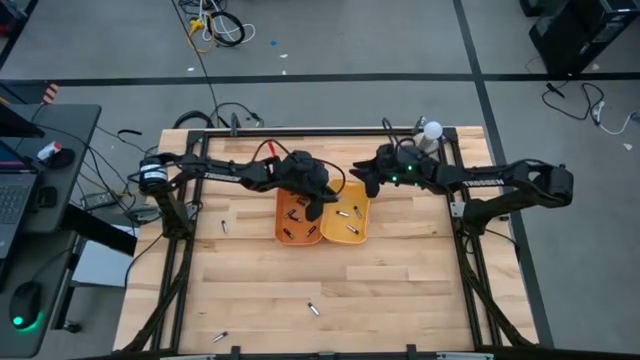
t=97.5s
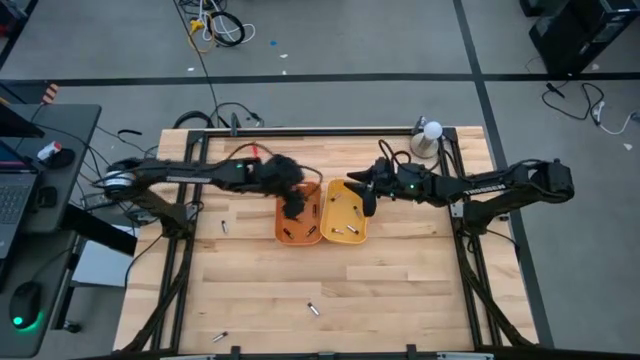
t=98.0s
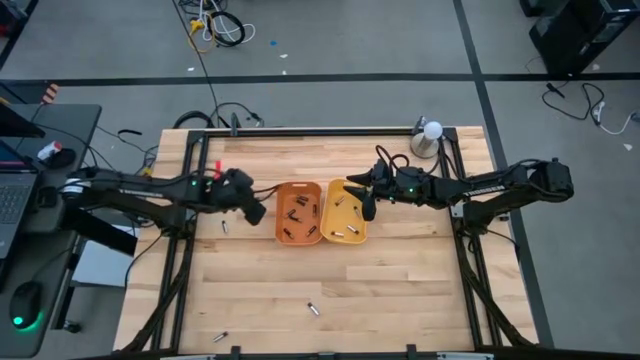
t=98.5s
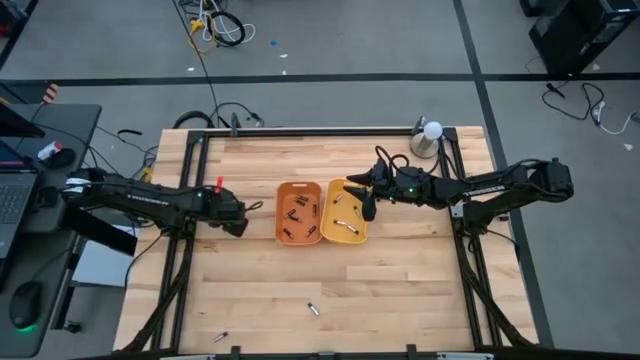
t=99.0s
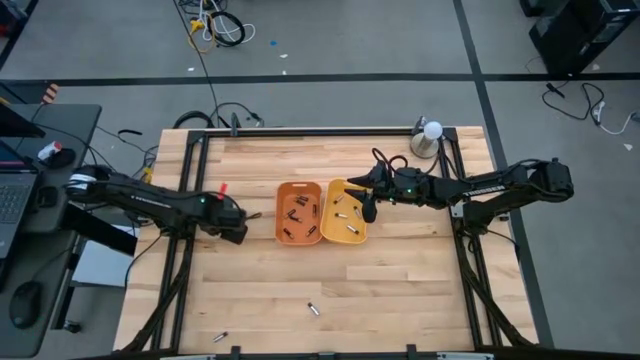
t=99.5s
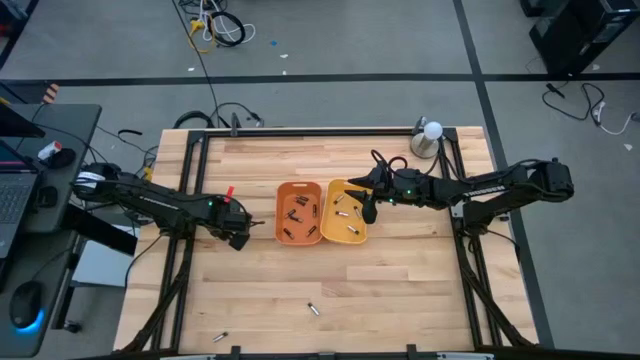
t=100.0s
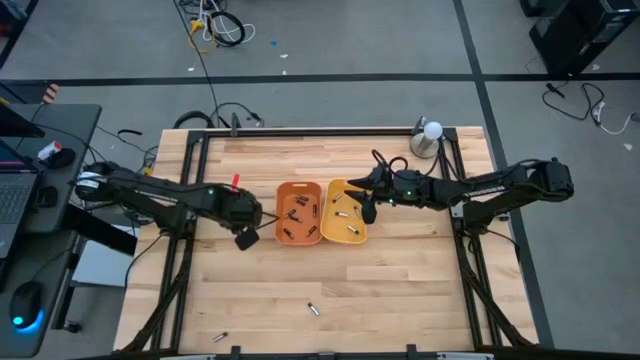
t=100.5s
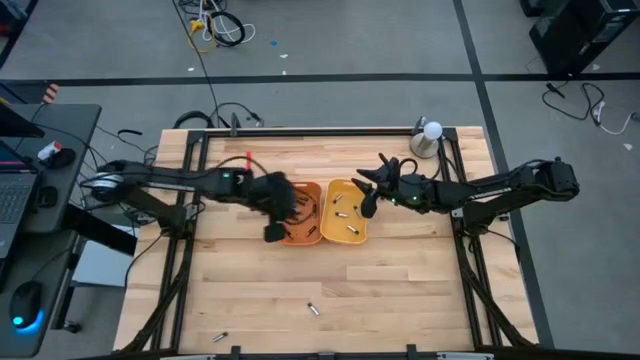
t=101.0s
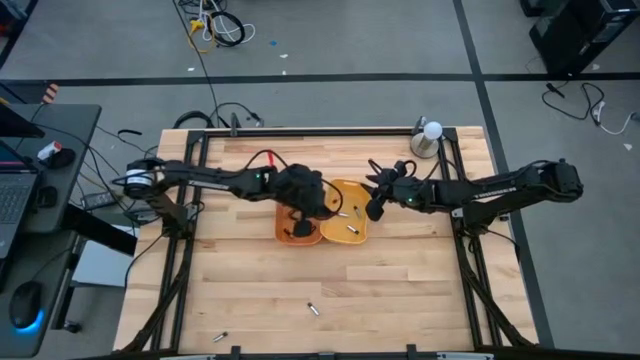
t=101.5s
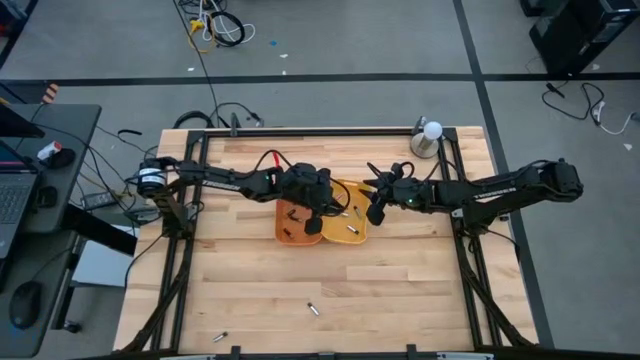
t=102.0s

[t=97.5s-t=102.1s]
Task: Sort batteries
Put the silver battery into the yellow bin

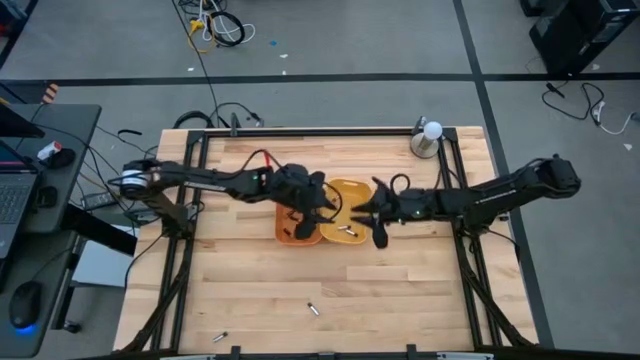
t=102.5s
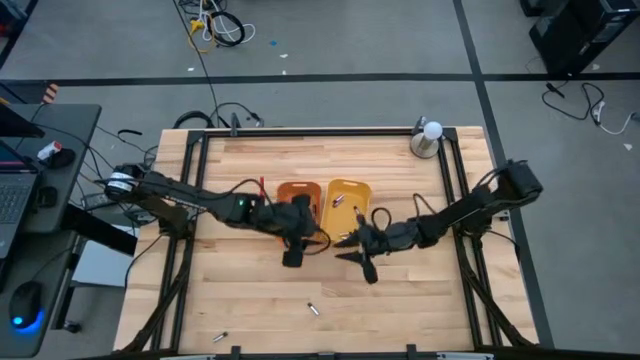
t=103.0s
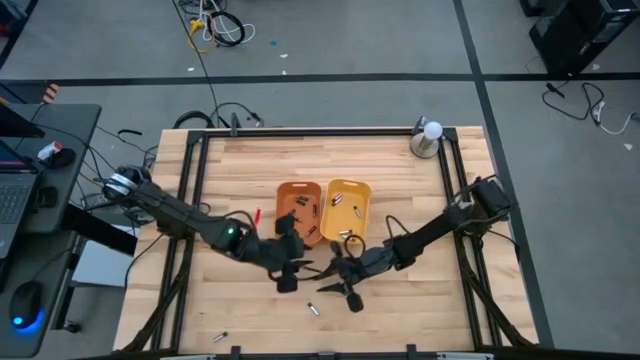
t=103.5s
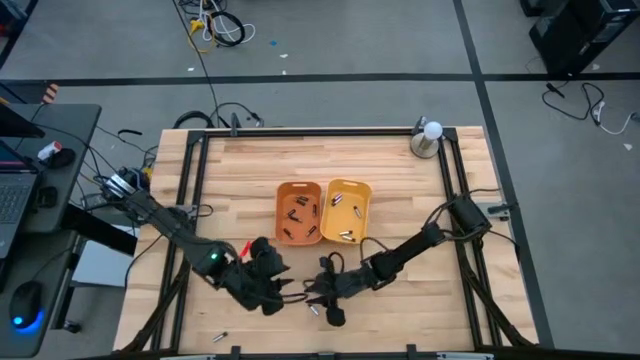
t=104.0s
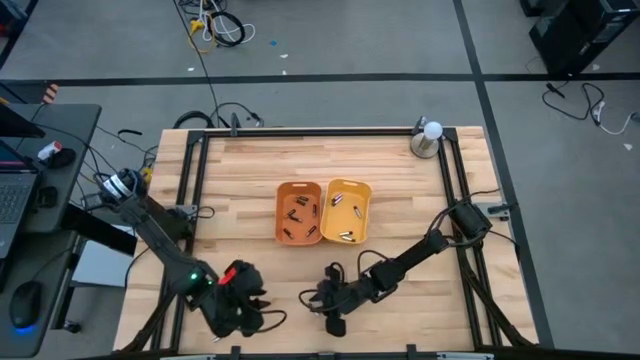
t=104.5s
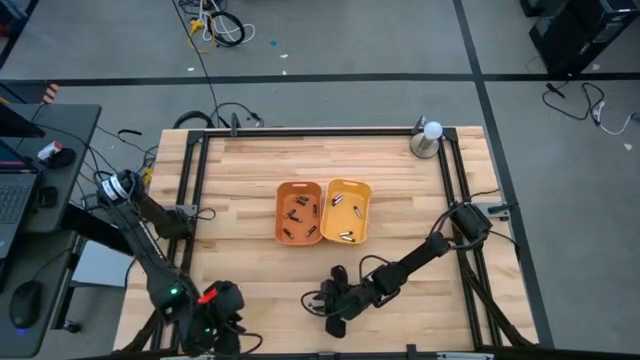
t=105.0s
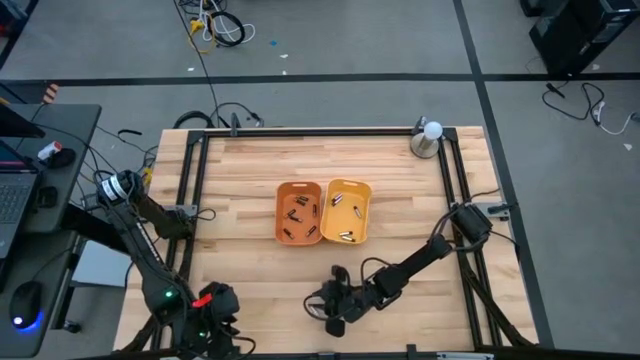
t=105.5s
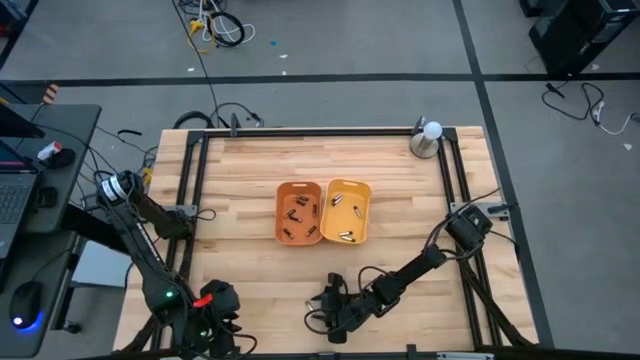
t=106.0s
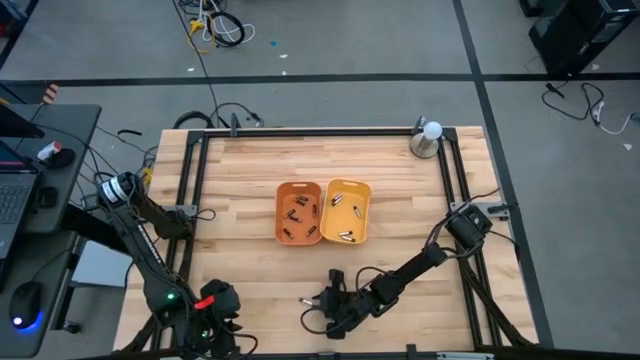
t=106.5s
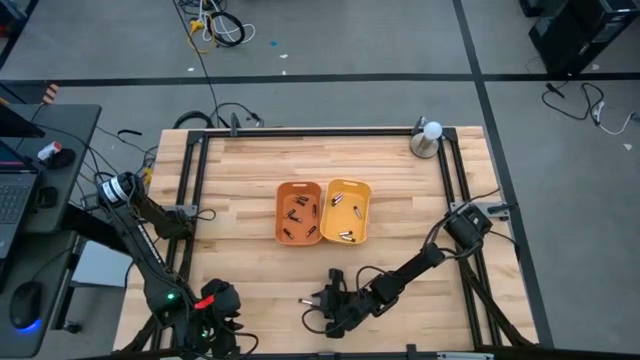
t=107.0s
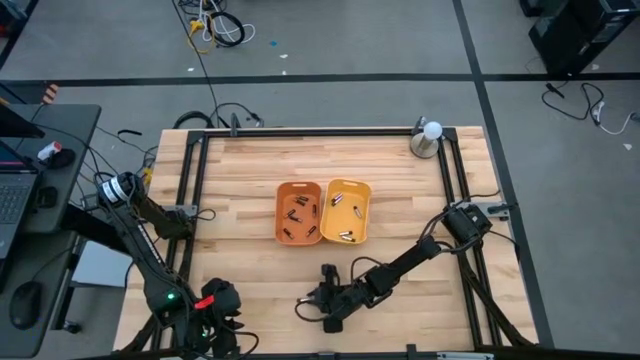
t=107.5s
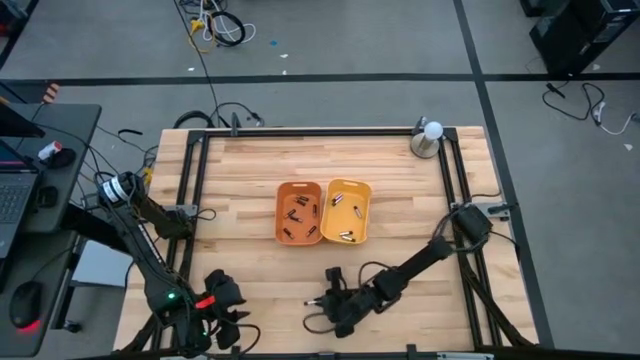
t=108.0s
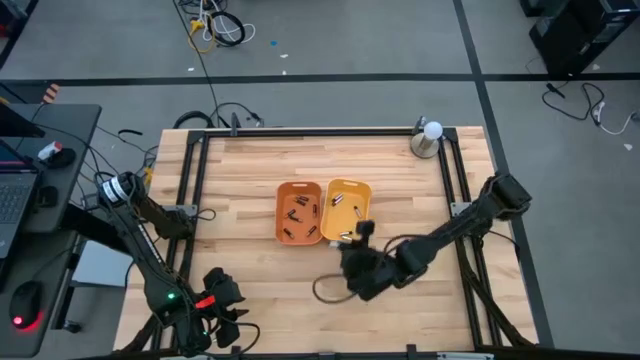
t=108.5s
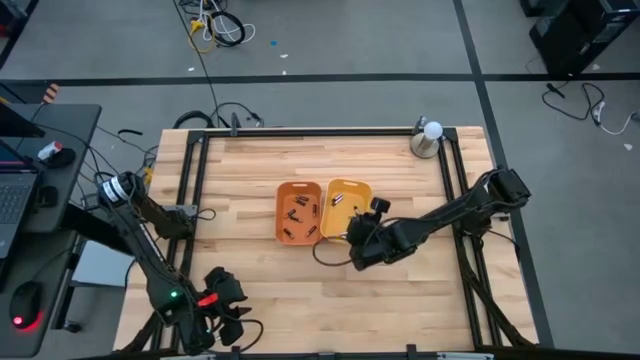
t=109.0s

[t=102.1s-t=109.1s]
Put the silver battery into the yellow bin

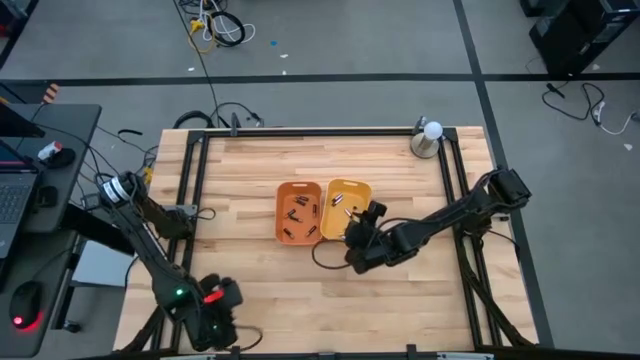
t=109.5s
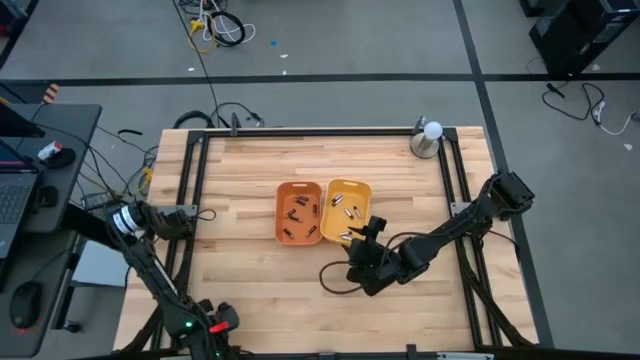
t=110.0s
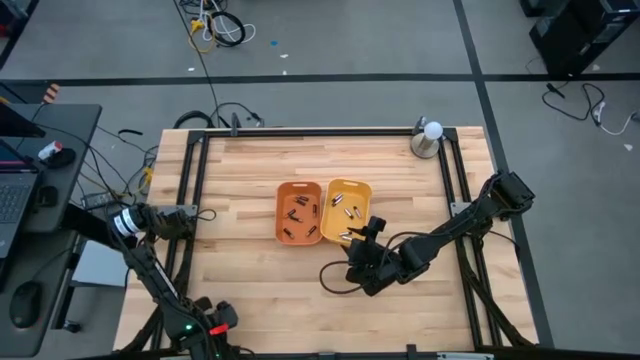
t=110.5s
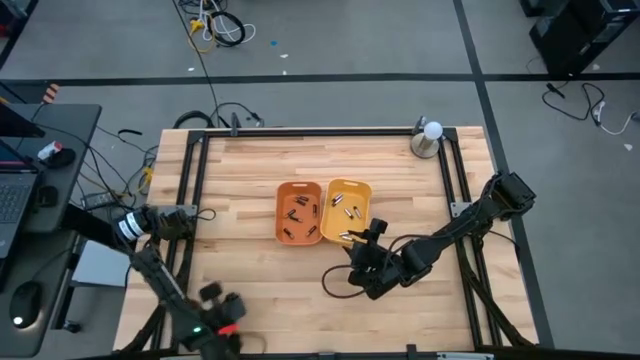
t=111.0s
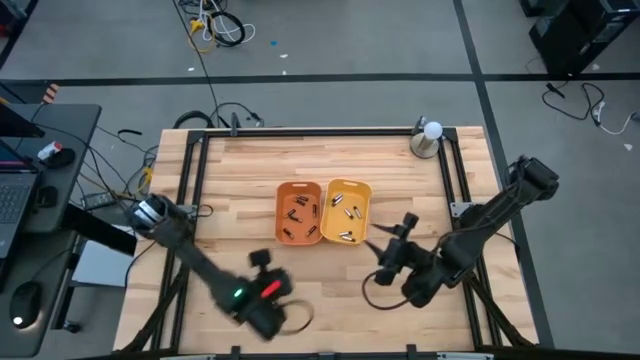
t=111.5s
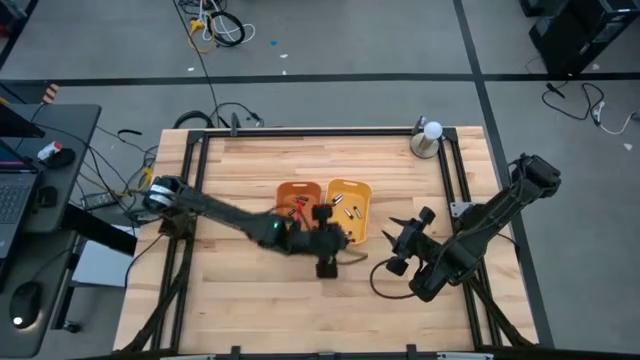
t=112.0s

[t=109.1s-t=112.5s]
Put the silver battery into the yellow bin

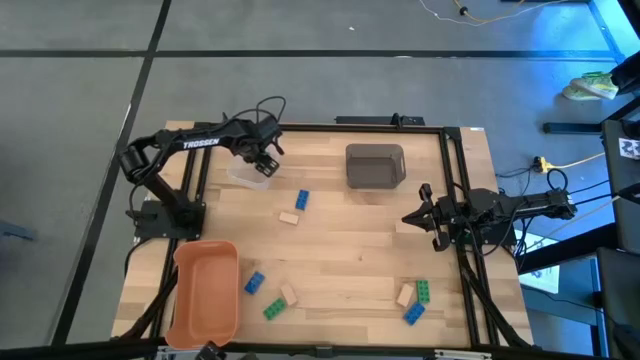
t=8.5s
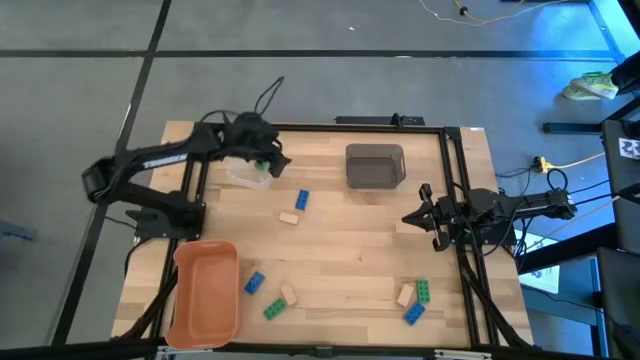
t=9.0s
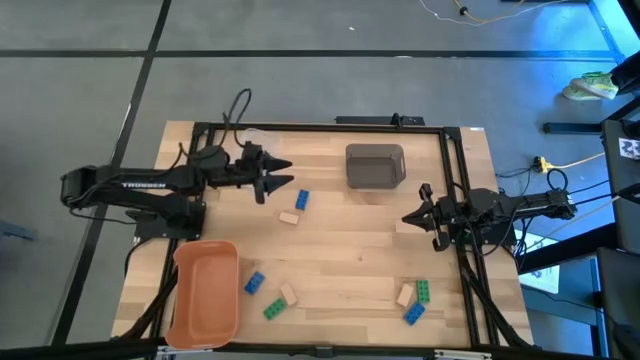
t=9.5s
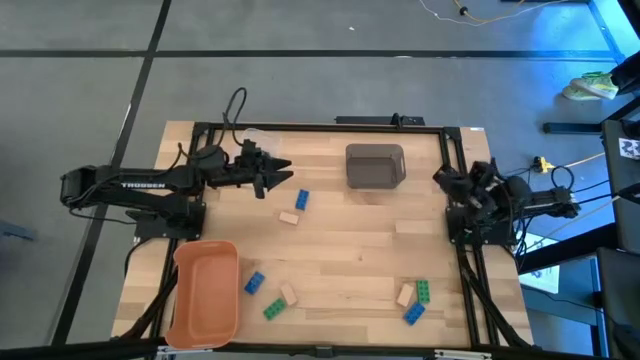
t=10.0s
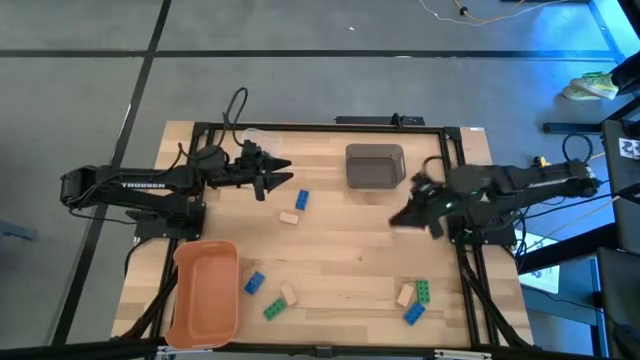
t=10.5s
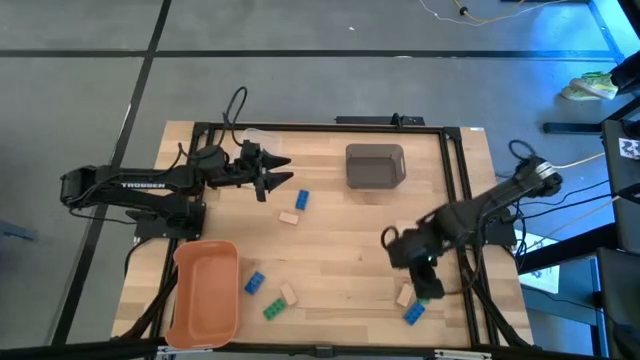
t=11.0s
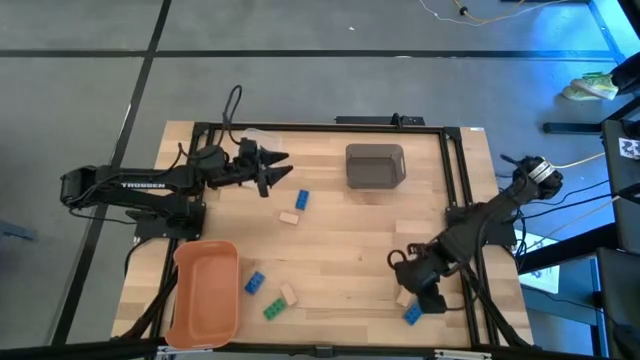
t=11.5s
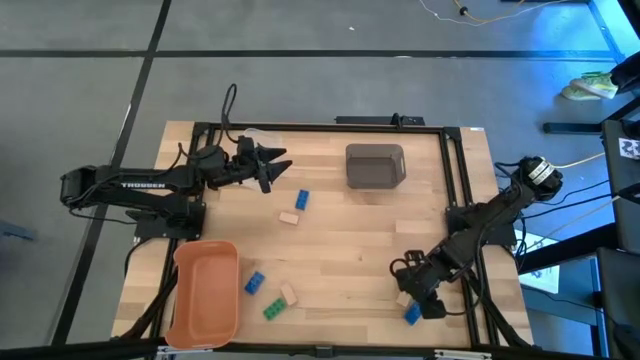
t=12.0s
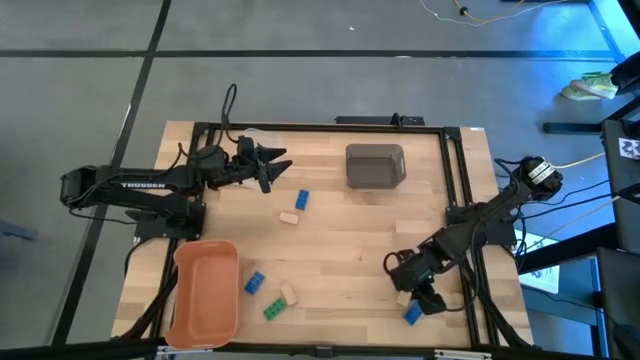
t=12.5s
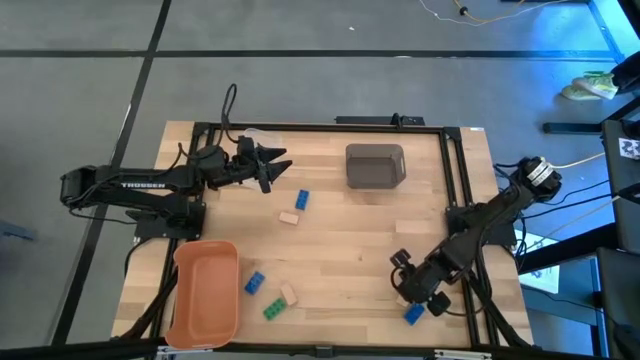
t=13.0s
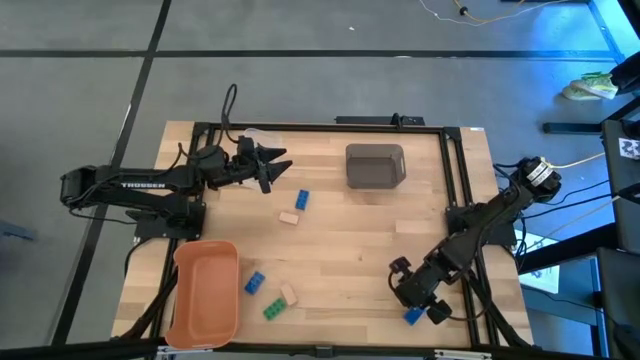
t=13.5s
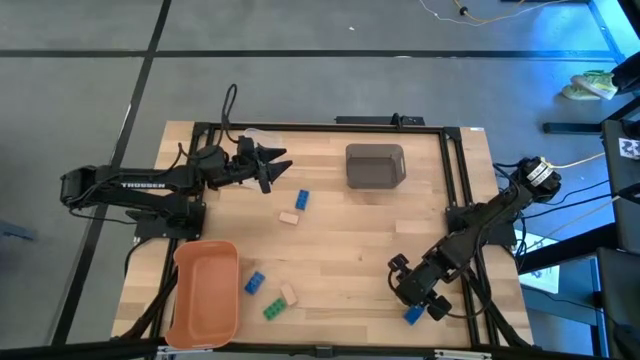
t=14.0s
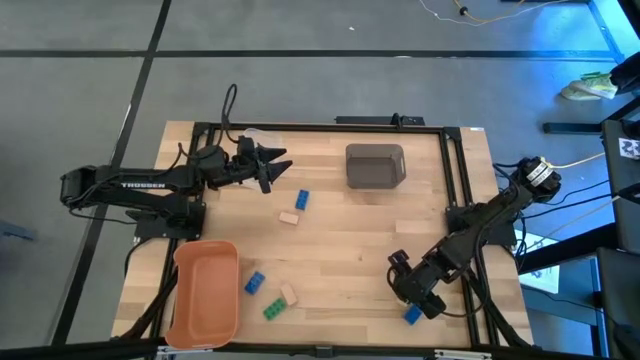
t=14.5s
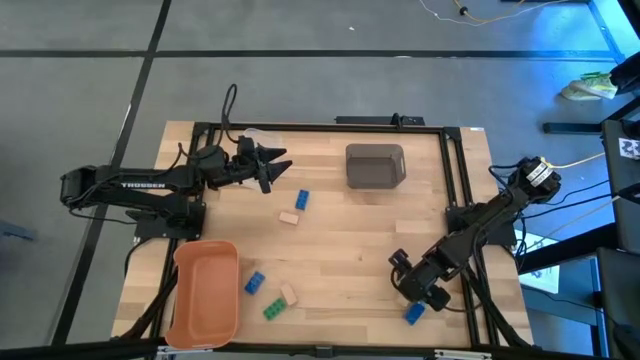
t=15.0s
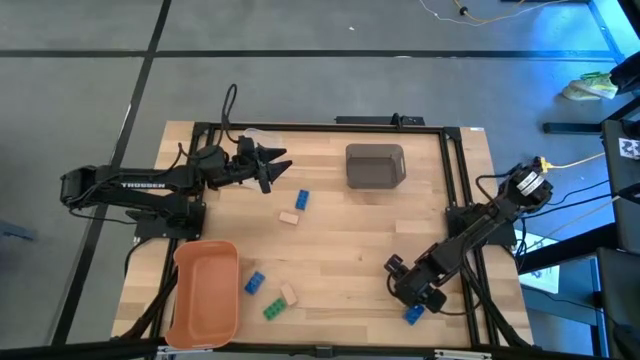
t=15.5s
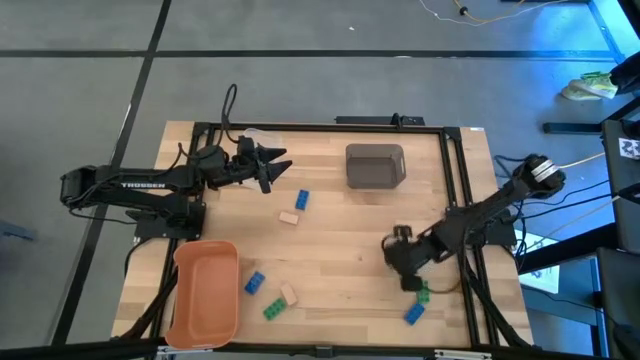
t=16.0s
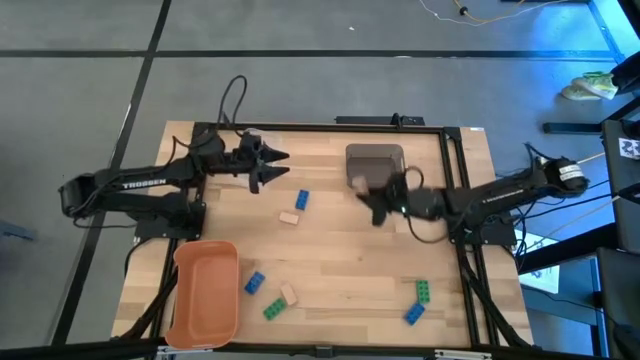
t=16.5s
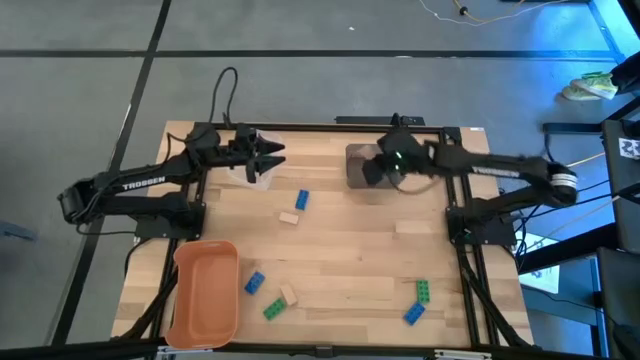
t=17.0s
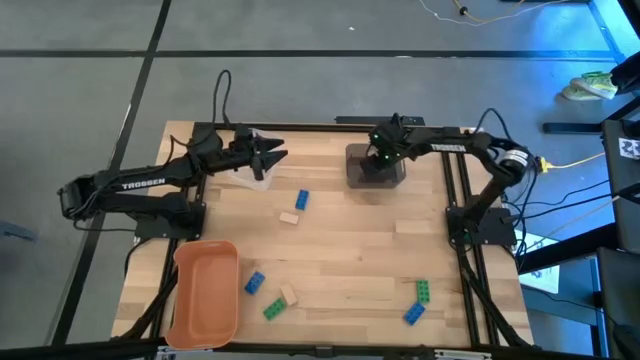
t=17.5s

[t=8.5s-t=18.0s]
Task: Sort & place blocks by color
Put the bottom right brown block into the black bin
